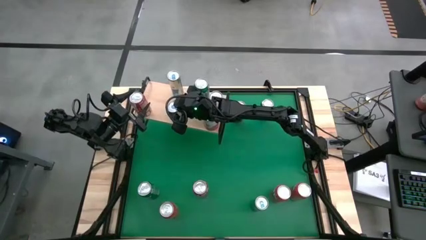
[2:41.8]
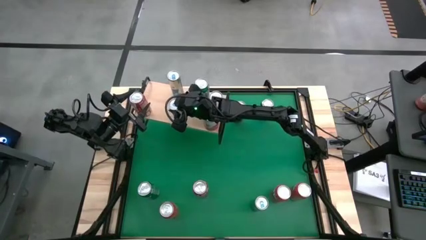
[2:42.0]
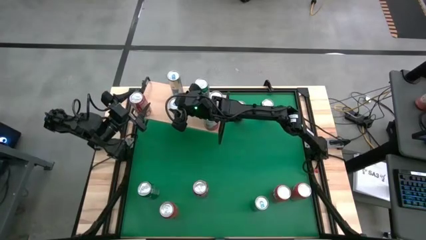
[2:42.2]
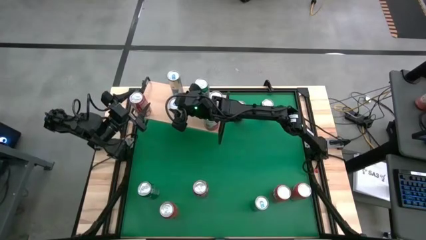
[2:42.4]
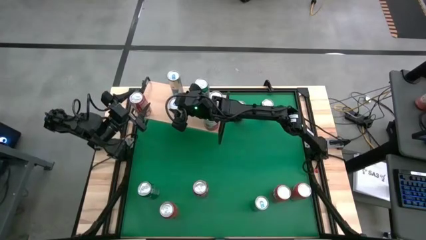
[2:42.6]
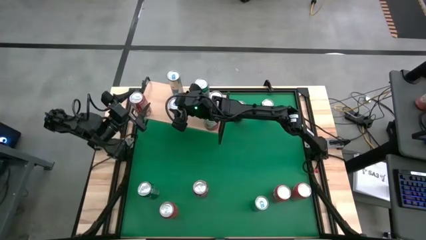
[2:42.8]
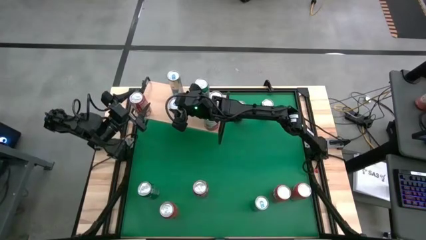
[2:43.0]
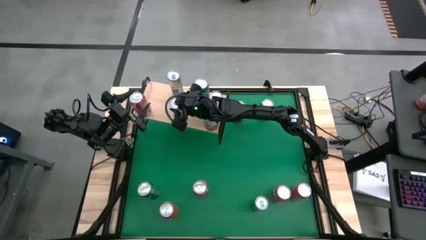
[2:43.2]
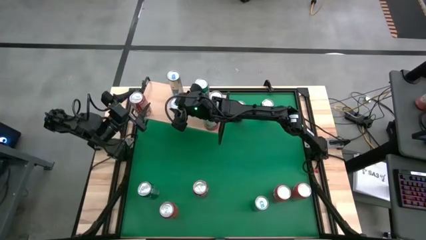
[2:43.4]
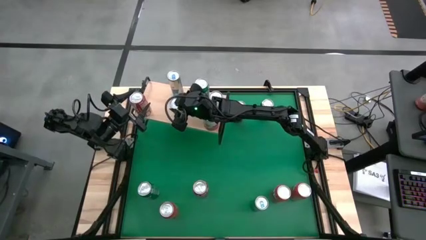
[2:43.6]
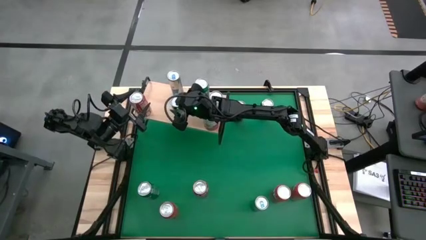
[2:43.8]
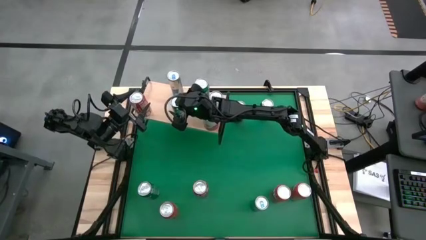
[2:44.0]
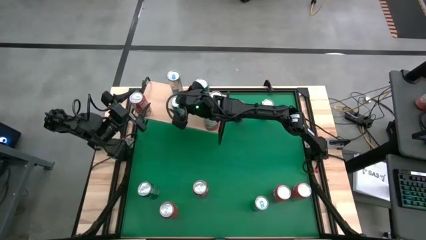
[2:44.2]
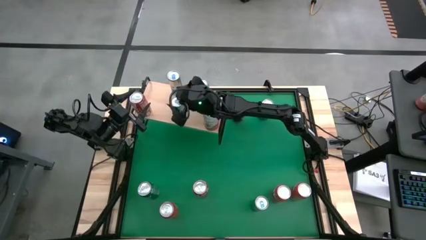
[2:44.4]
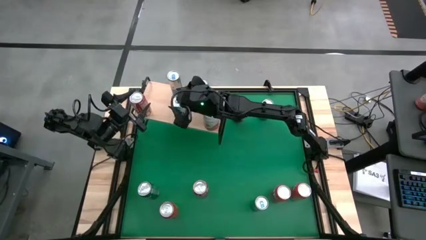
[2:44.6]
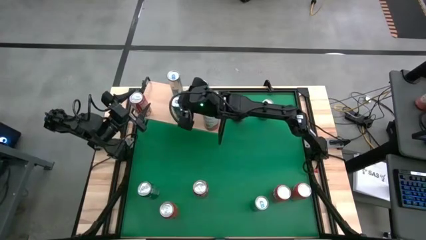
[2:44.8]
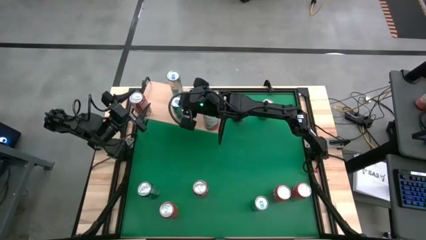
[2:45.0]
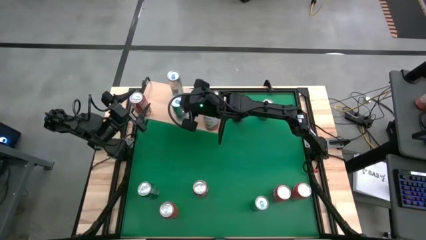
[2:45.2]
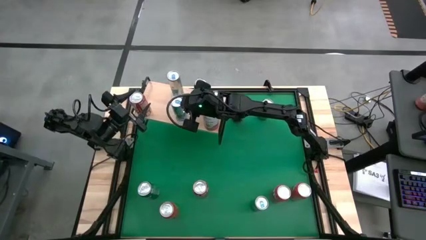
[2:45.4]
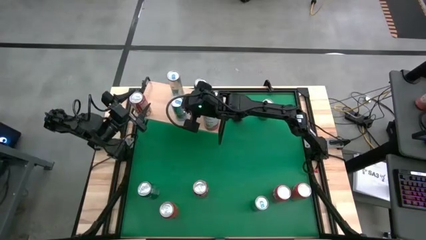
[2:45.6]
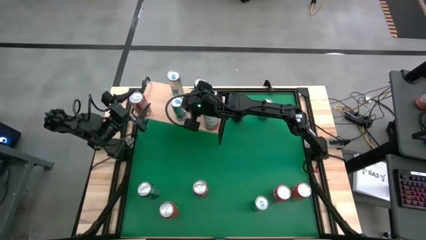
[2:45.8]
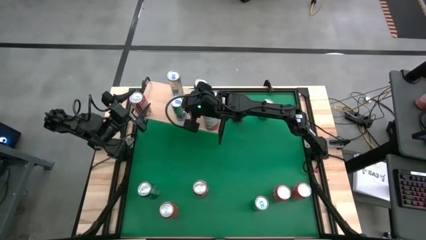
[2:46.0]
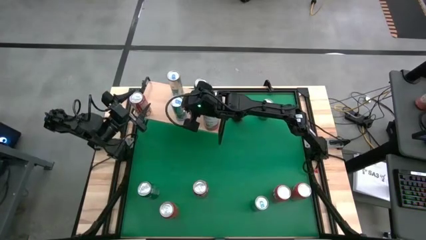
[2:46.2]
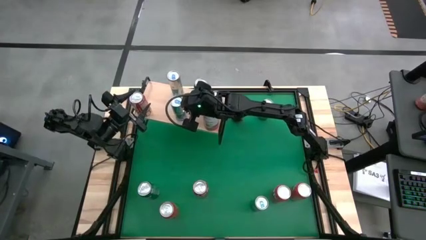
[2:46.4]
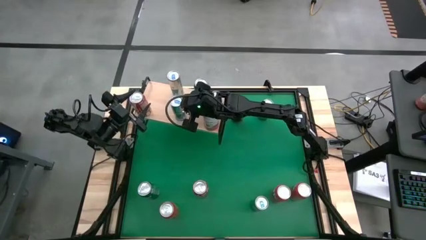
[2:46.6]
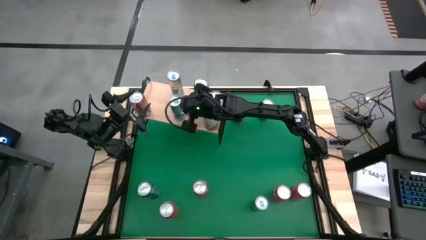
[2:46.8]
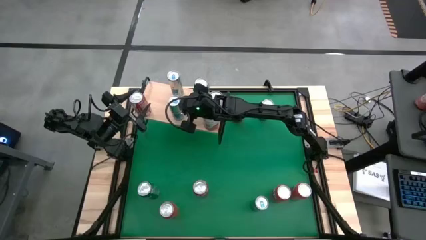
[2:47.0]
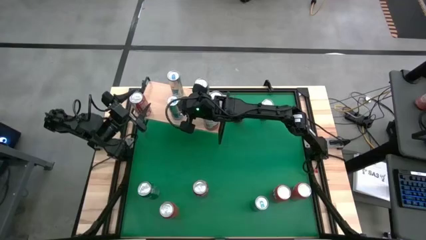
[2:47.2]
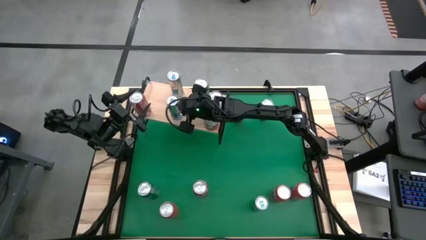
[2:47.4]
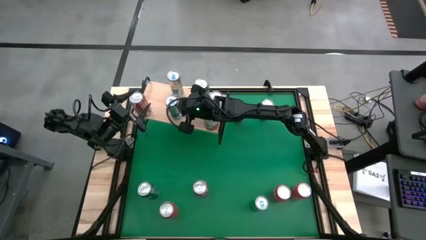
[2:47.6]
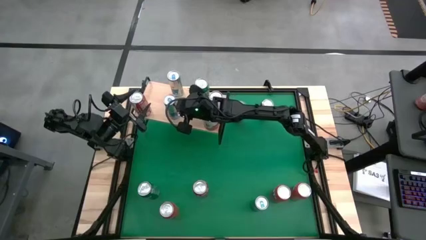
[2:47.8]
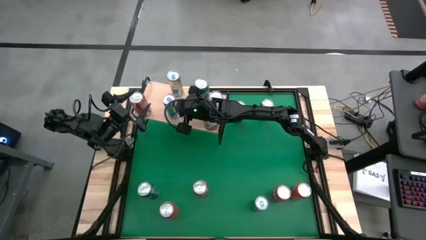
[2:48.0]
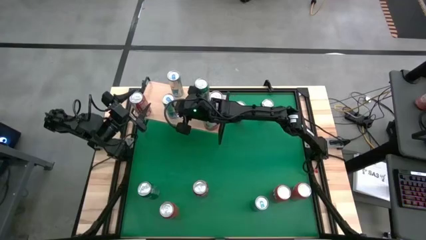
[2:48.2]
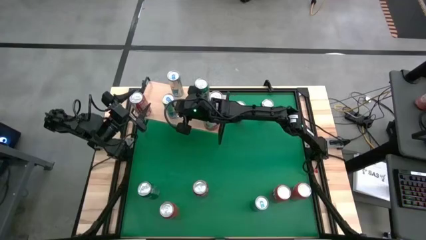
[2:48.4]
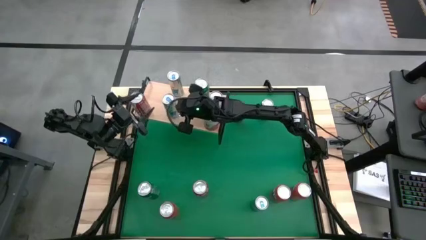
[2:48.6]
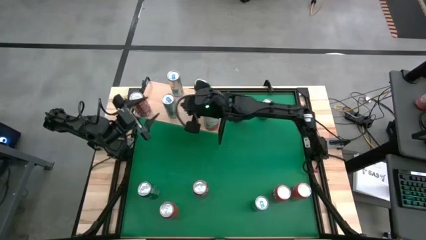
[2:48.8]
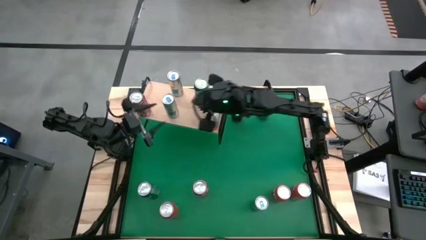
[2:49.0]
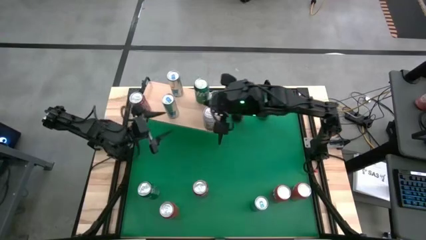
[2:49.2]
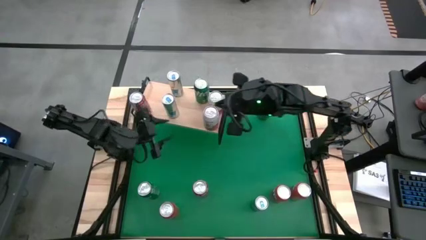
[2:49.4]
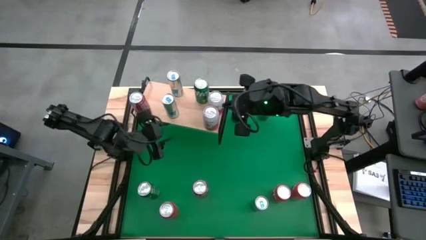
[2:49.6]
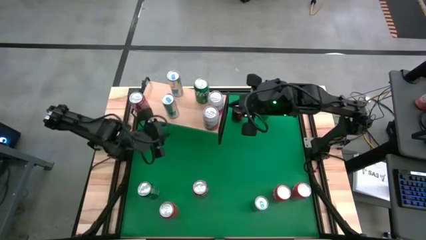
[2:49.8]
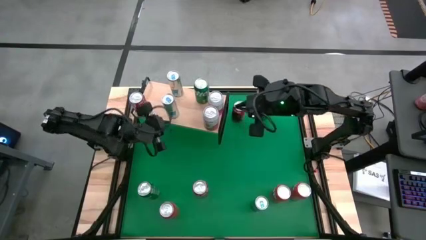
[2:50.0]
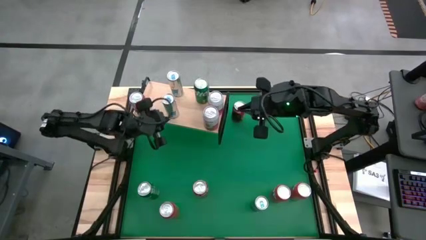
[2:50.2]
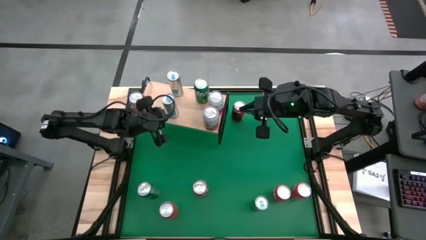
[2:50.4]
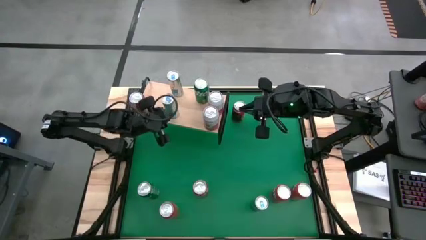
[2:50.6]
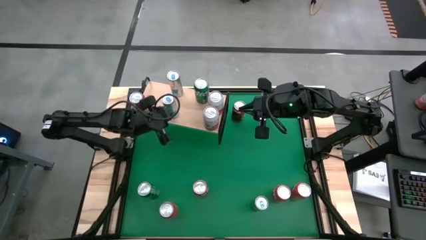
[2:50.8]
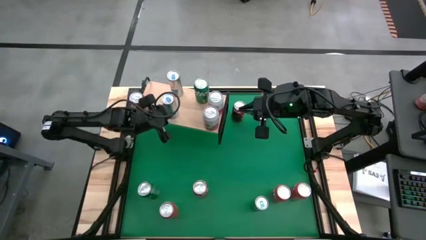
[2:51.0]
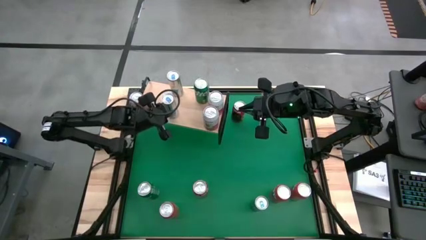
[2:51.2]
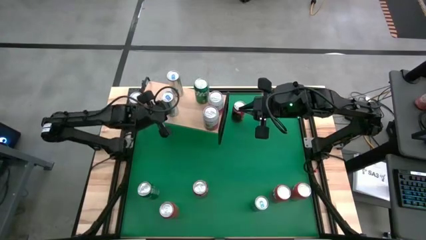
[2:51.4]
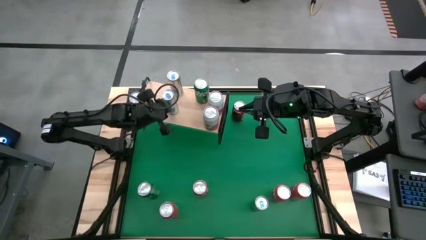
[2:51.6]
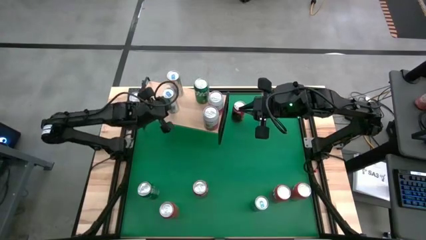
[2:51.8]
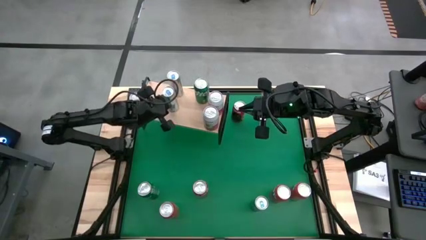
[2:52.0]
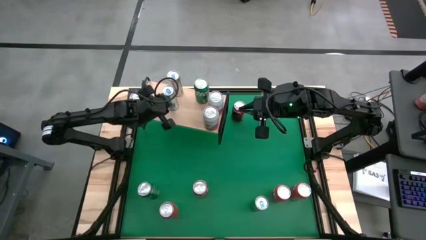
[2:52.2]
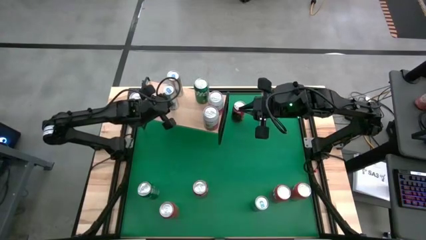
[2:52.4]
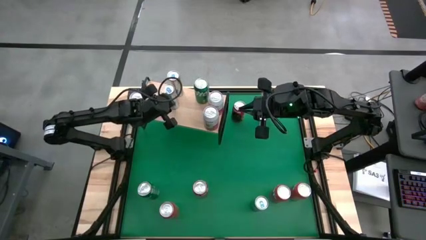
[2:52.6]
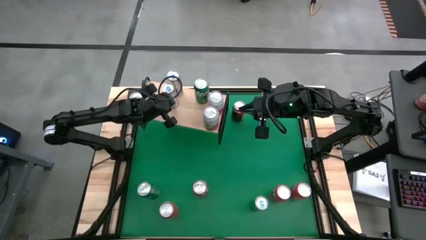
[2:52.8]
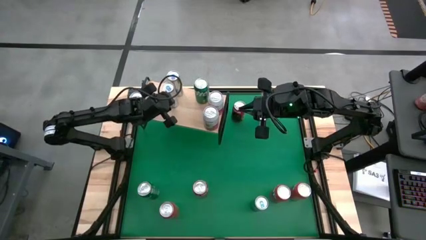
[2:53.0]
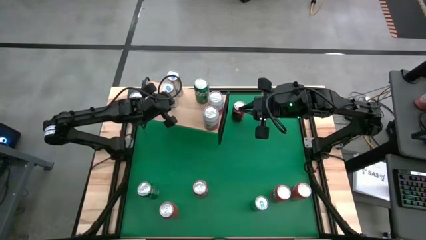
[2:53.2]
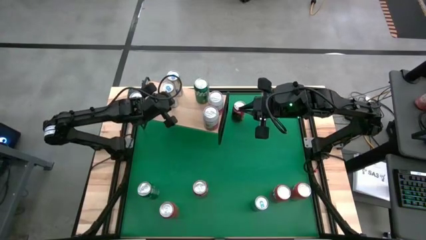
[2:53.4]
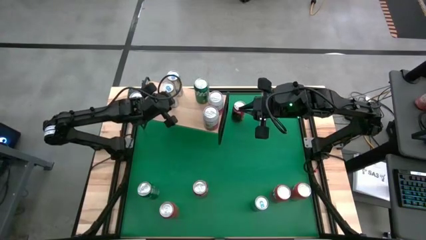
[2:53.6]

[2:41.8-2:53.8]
Task: Place canned beverage on shelf
Put the blue/white soda can on the shelf aligned with the other blue/white soda can

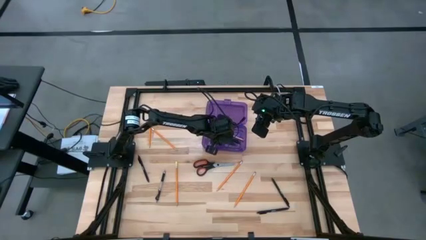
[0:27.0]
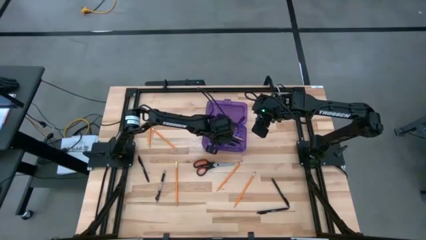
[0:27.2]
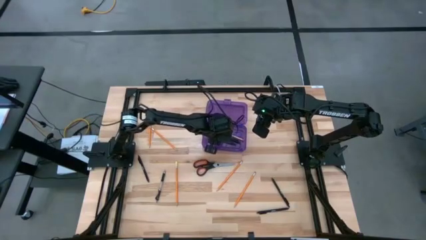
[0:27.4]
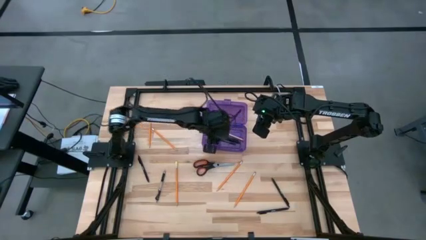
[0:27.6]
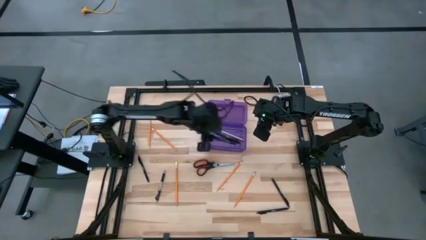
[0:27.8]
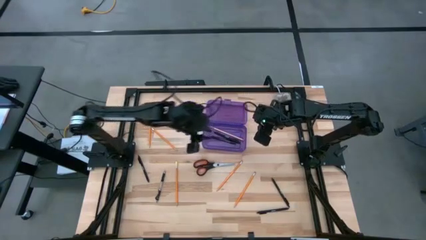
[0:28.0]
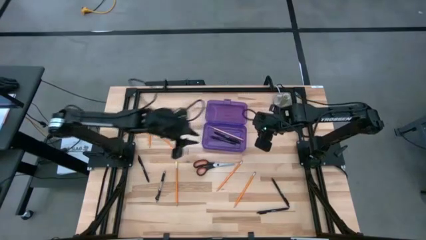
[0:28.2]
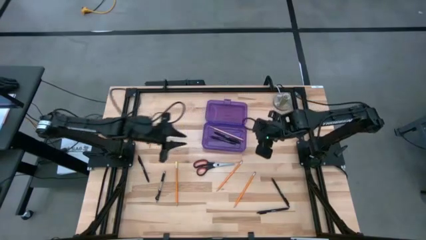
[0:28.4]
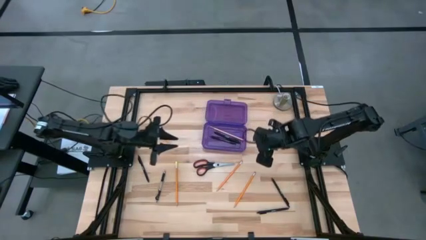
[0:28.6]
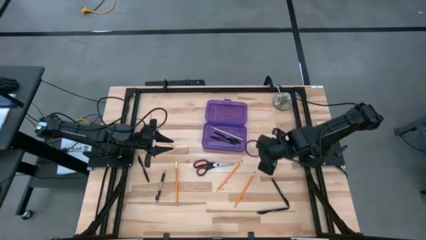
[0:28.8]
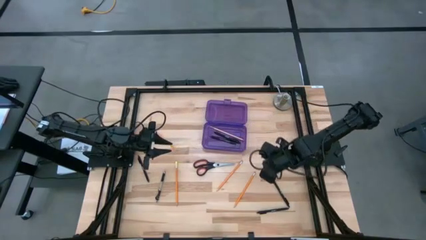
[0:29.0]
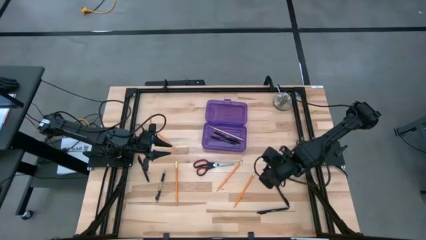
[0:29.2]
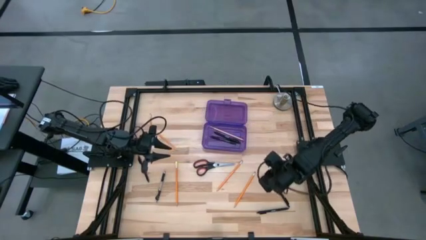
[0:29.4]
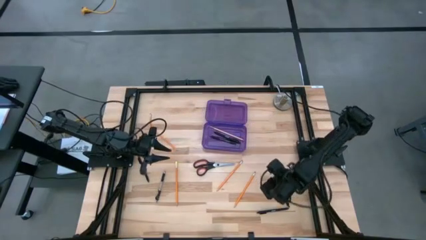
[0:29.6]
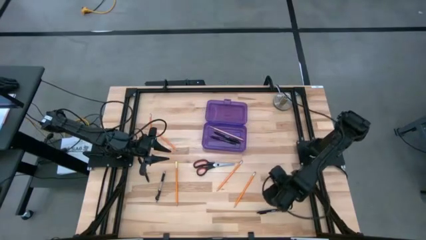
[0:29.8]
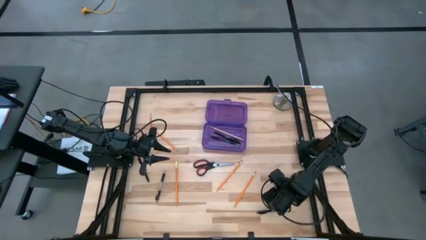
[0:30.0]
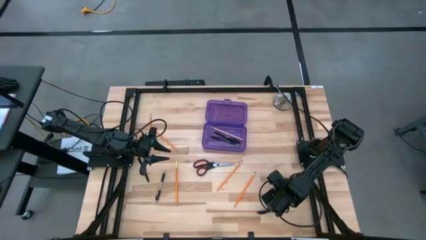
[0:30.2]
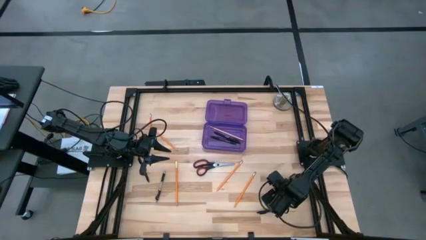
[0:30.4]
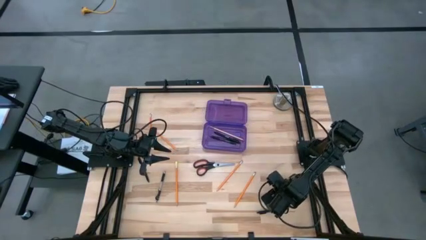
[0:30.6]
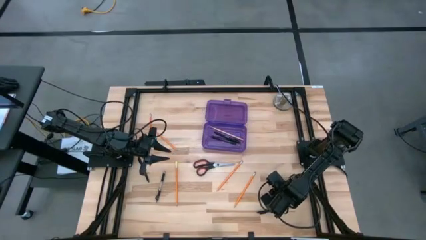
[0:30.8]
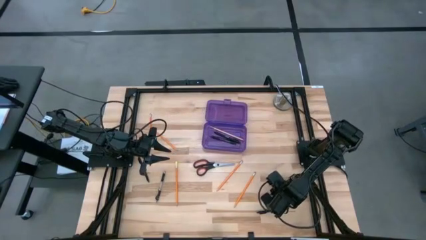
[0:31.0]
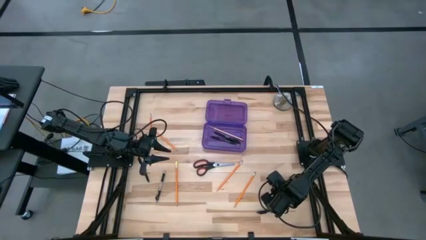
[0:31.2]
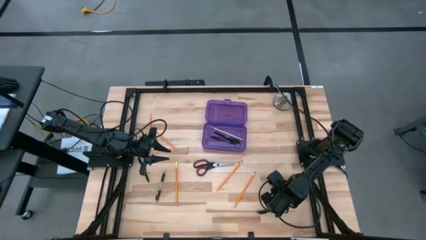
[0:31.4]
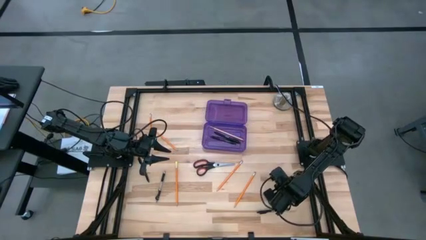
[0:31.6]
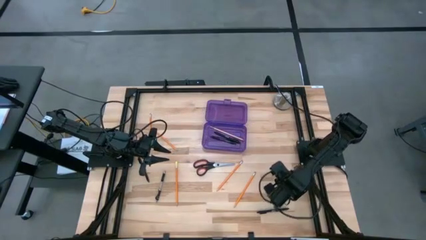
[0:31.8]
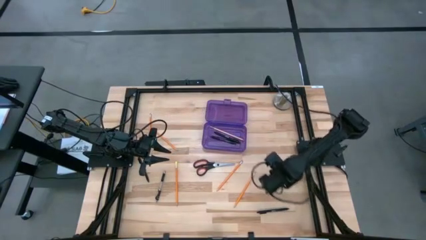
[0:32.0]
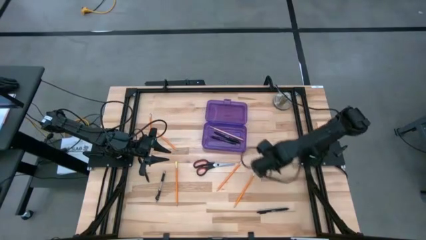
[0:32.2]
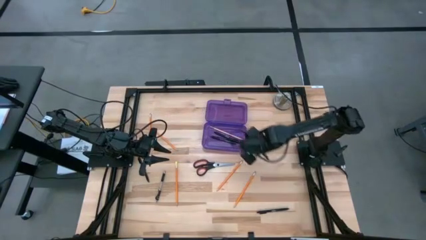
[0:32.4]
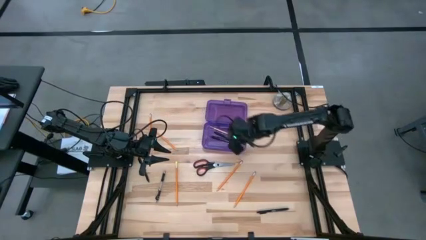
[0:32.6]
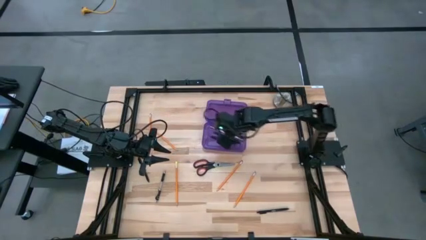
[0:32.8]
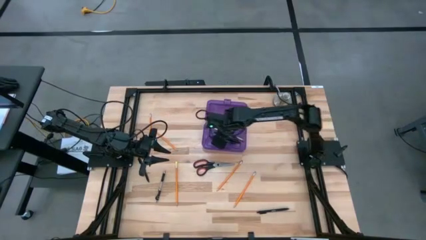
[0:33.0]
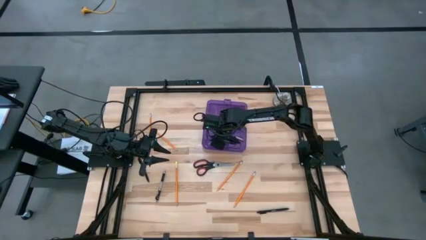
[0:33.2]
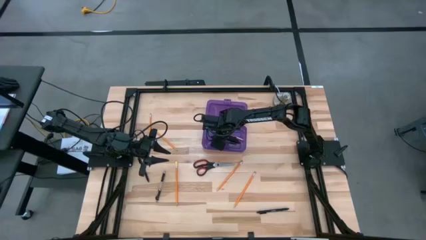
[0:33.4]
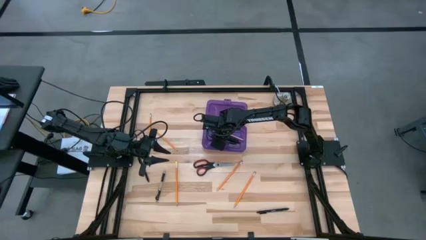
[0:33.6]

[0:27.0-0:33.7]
Task: Pick & place school supplies into a supply box
Put the black pen into the pencil box
